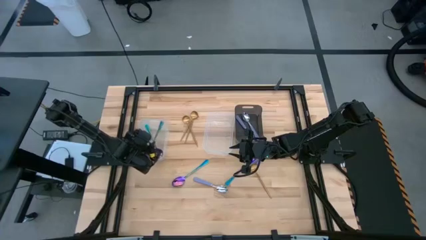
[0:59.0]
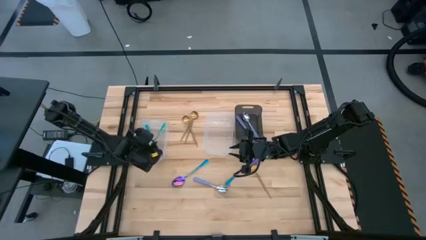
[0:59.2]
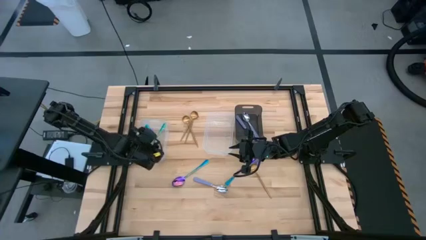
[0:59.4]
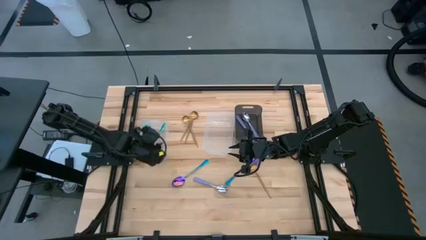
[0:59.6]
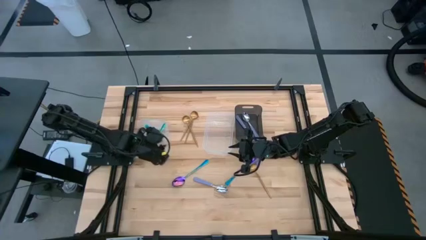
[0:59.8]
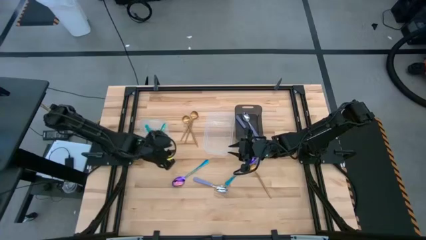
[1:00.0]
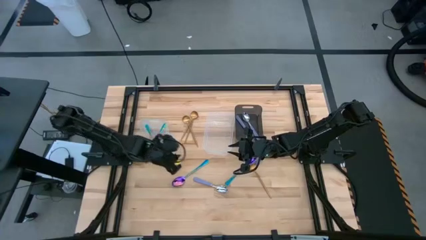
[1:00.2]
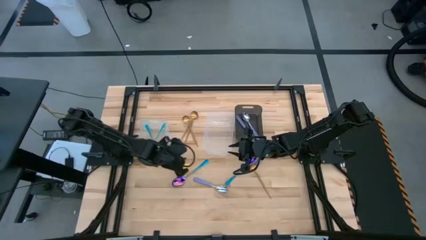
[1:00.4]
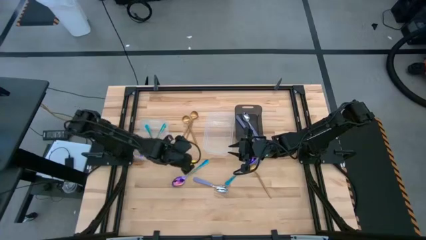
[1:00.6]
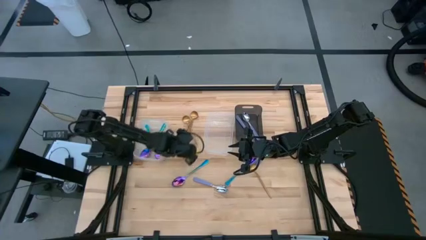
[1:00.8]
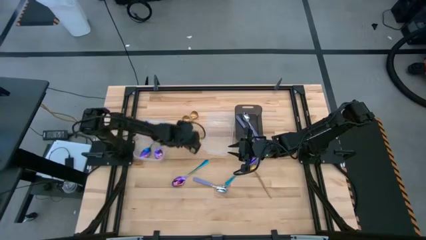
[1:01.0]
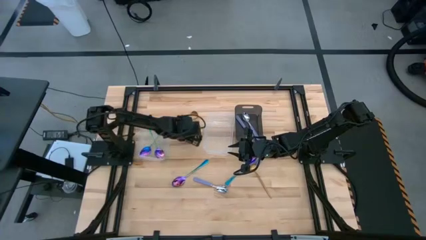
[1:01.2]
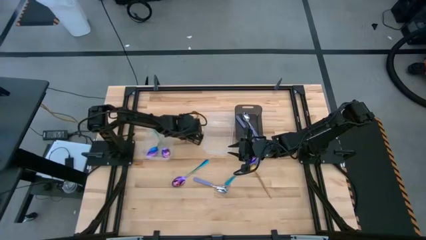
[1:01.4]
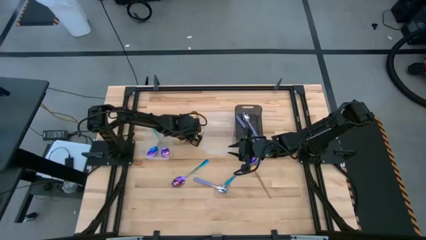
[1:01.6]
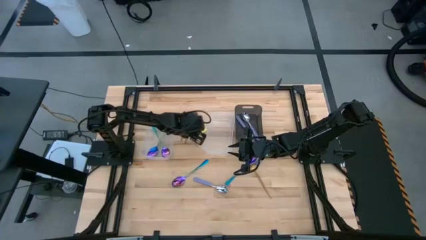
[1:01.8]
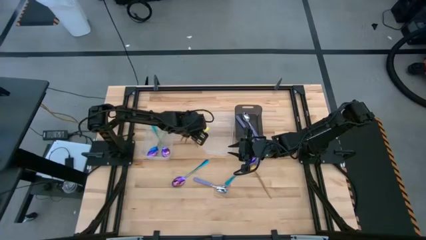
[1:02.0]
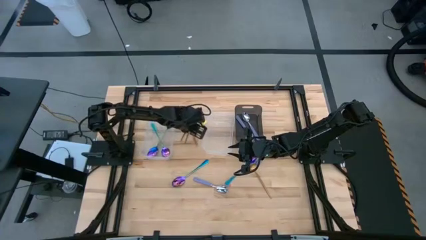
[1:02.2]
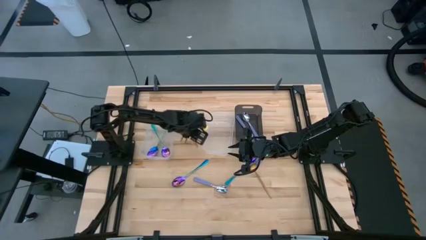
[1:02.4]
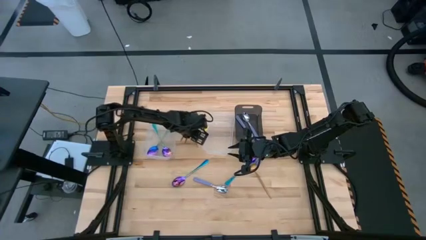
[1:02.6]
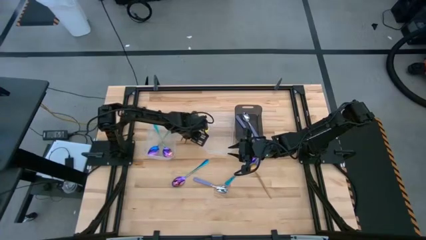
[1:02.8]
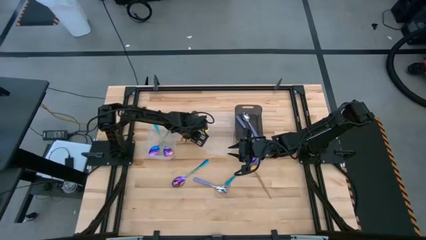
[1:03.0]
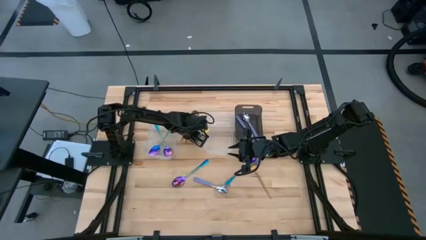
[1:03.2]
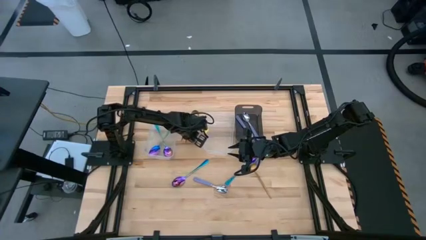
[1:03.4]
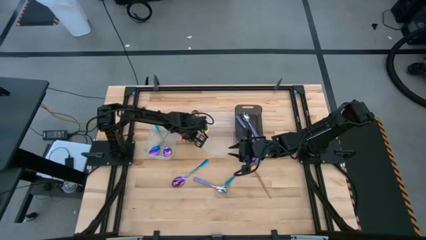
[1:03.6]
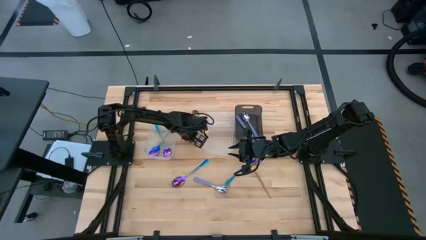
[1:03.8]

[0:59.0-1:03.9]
Task: Sort silverware by color (type)
Put the gold spoon into the right transparent bin

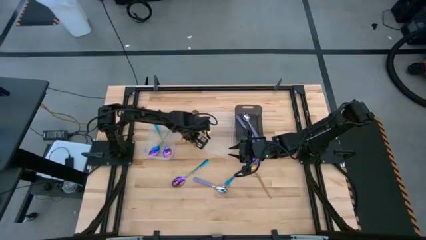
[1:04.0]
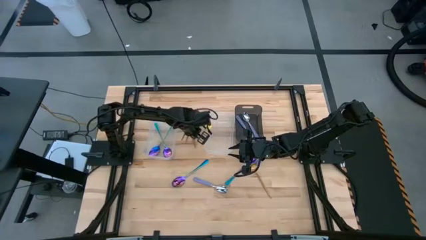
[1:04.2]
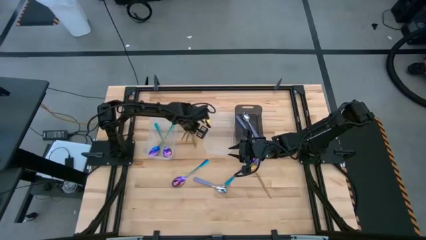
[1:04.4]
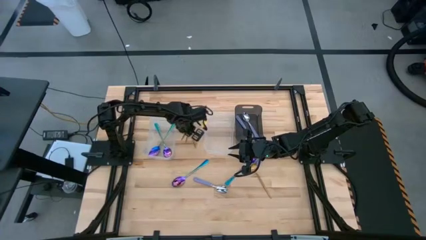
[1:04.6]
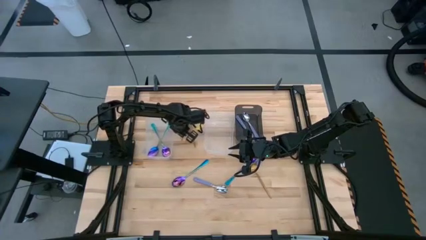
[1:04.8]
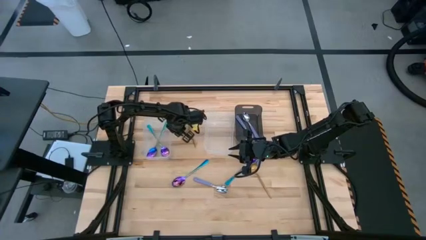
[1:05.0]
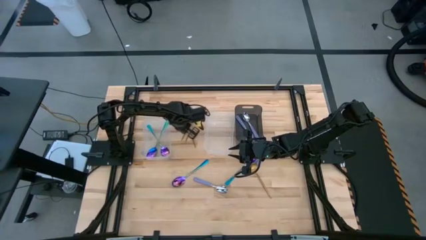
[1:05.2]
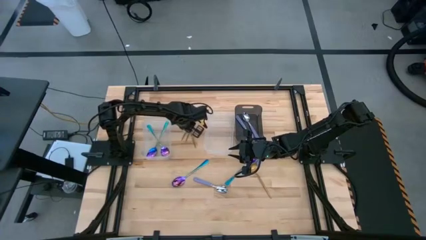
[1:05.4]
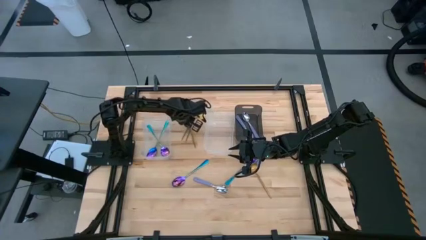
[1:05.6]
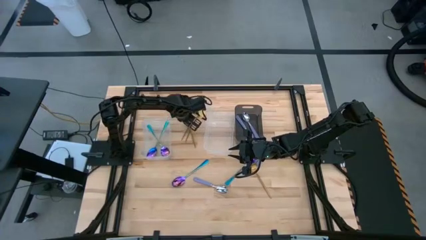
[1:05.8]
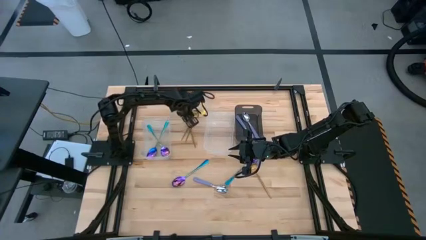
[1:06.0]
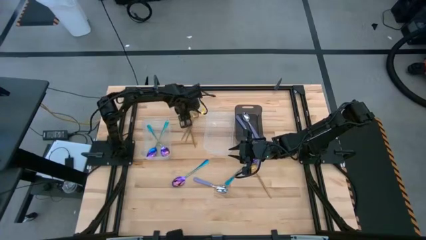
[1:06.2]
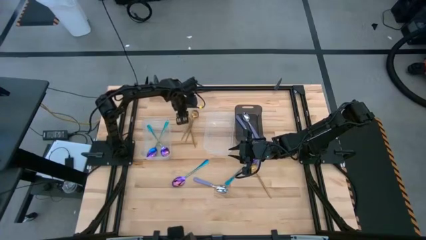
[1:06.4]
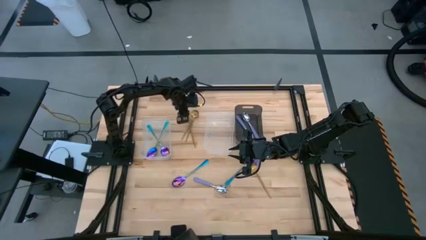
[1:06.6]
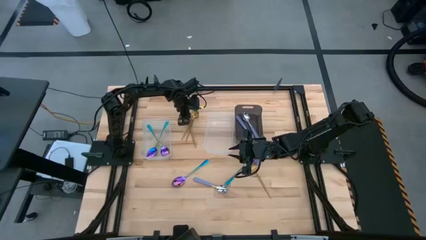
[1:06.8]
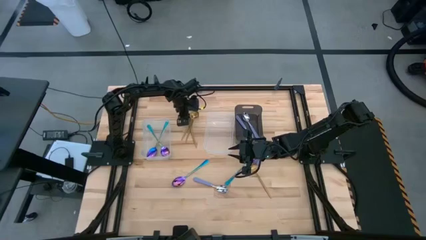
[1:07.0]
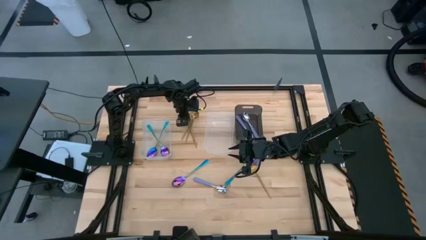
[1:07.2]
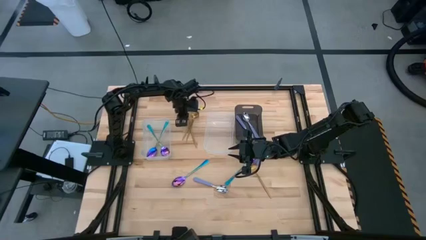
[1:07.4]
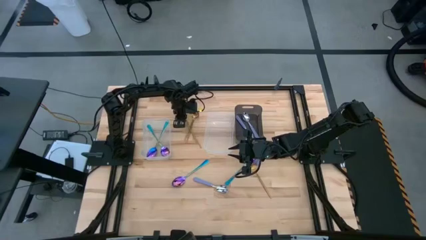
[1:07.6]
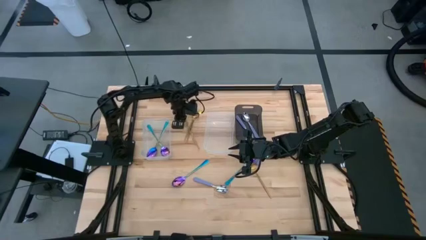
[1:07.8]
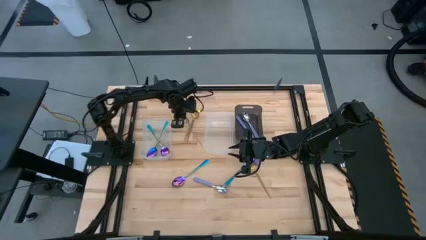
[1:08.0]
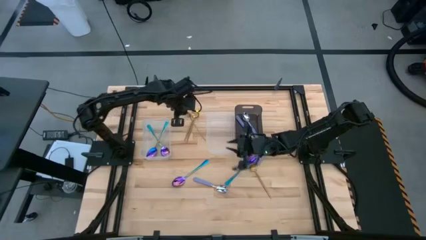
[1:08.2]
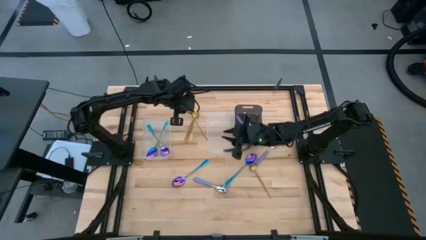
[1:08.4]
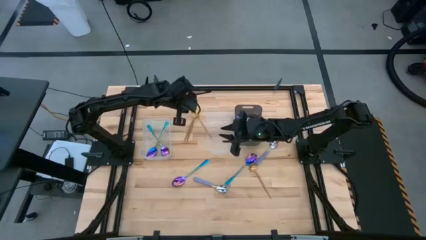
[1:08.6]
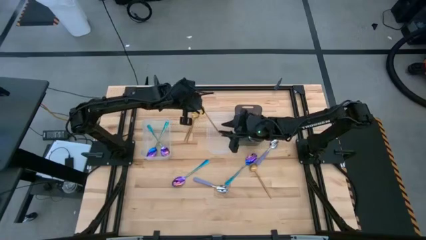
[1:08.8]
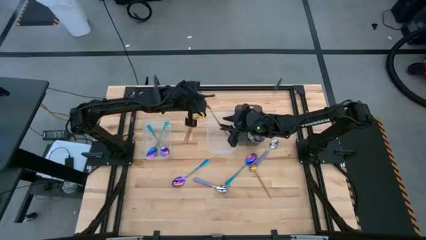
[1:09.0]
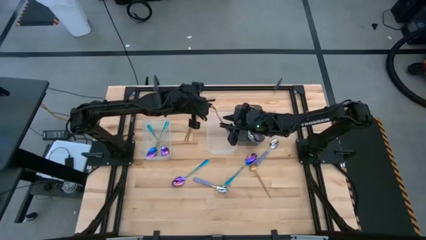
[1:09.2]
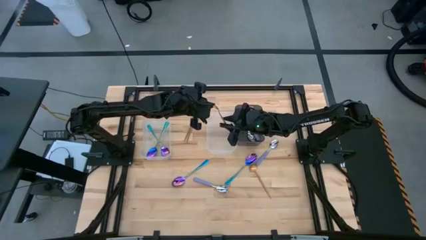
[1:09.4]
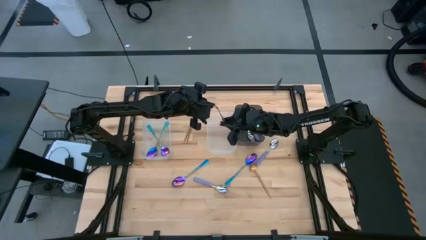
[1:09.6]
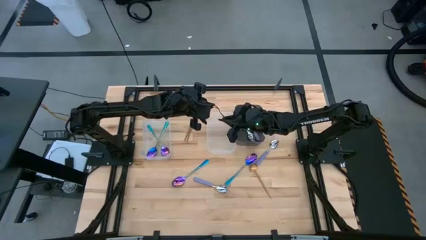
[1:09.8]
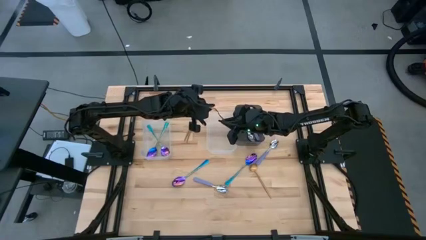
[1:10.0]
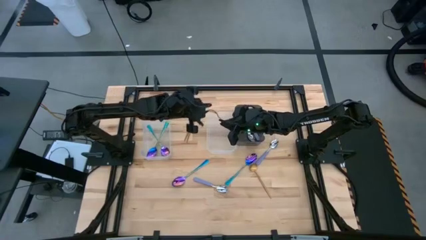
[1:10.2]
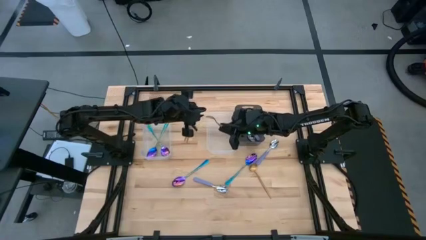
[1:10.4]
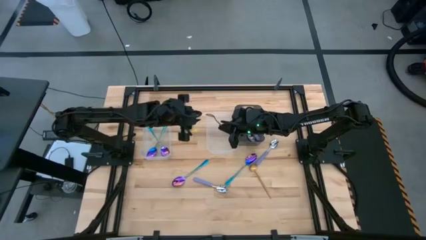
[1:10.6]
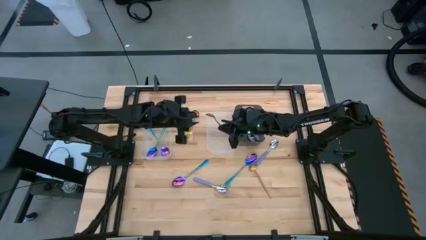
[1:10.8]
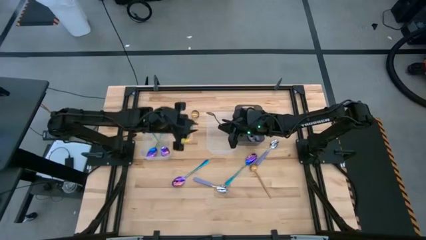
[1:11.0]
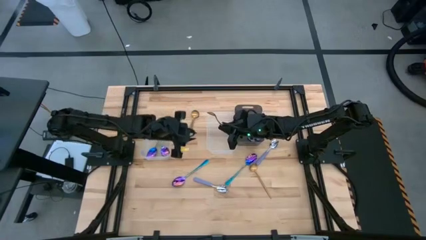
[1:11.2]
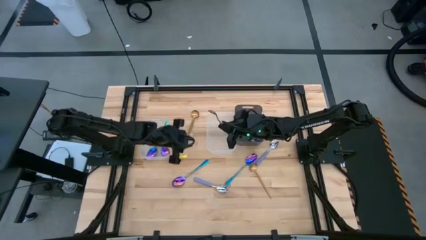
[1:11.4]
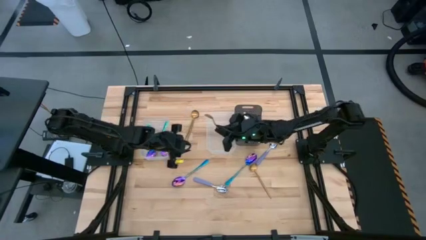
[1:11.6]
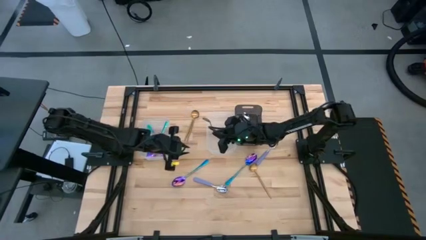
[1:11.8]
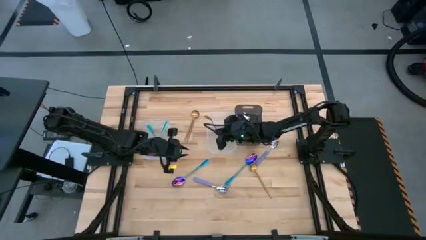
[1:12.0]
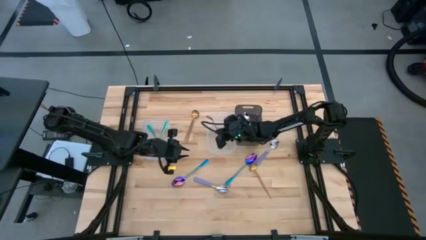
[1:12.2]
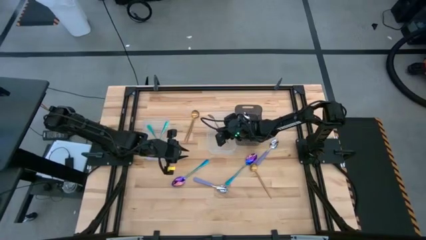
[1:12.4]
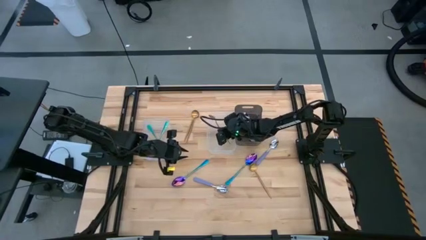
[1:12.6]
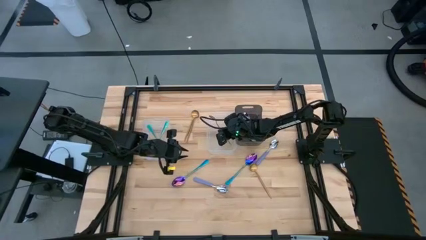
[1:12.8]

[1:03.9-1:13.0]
Put the gold spoon into the right transparent bin

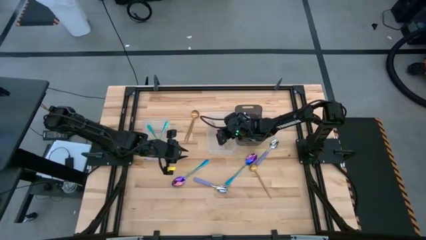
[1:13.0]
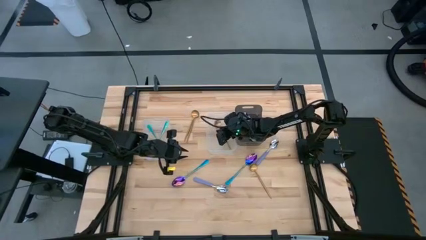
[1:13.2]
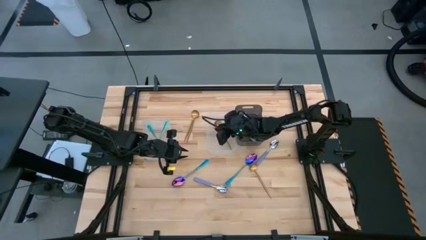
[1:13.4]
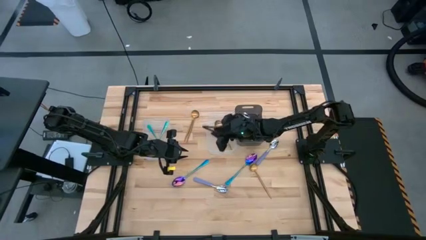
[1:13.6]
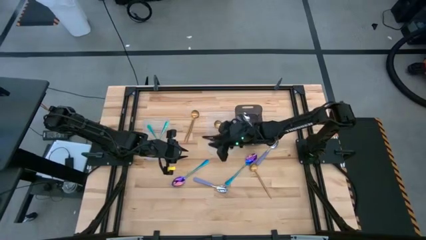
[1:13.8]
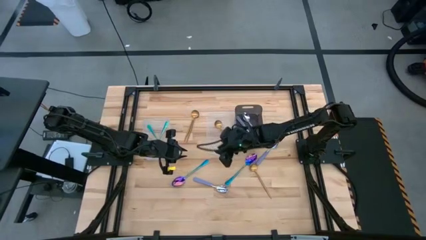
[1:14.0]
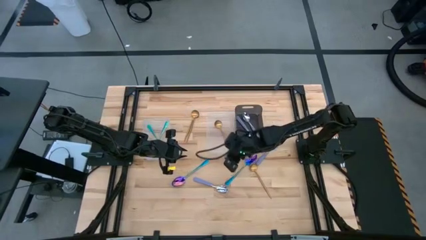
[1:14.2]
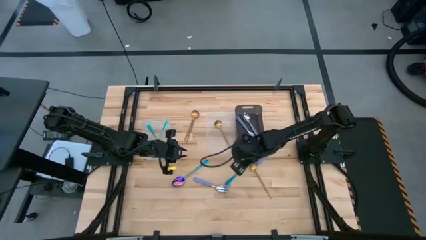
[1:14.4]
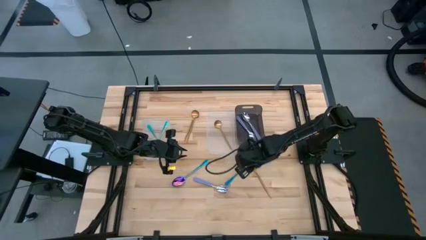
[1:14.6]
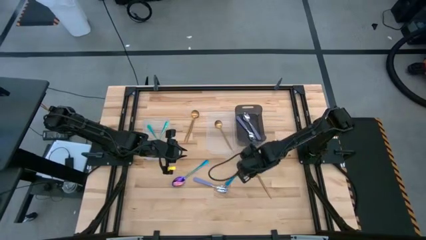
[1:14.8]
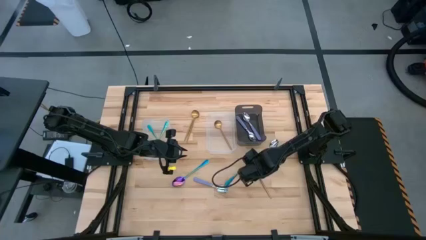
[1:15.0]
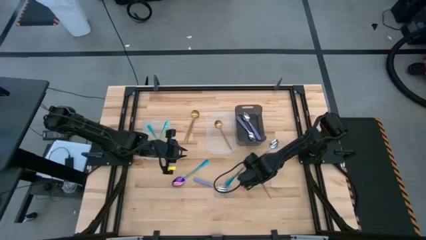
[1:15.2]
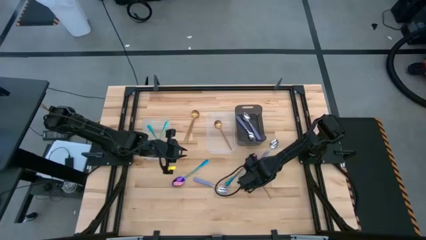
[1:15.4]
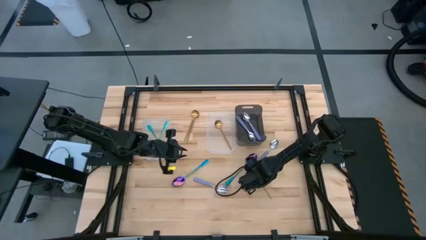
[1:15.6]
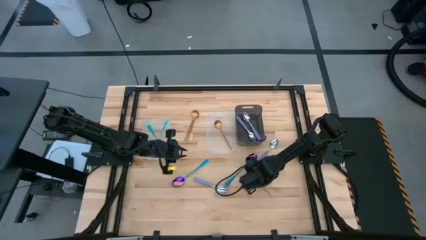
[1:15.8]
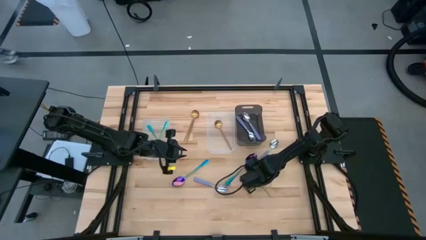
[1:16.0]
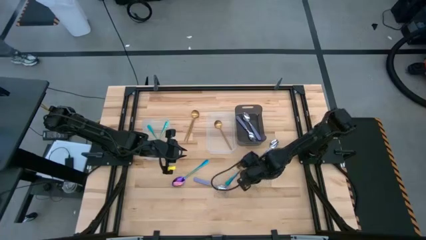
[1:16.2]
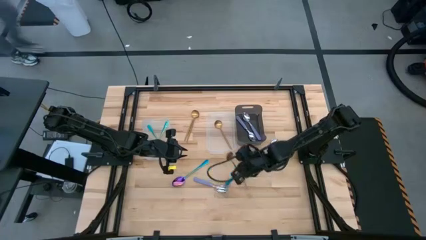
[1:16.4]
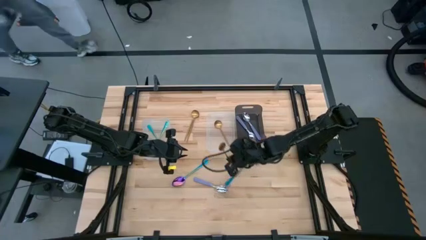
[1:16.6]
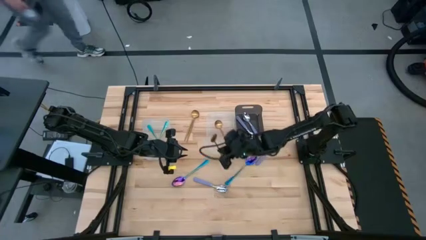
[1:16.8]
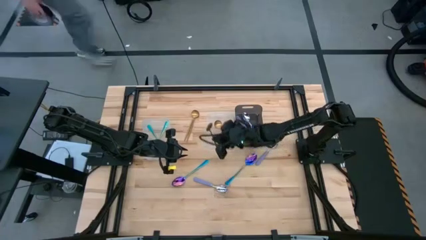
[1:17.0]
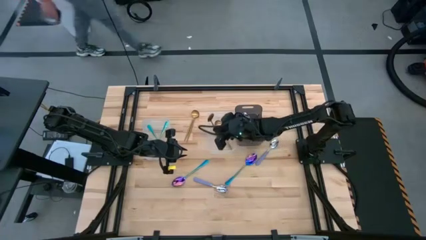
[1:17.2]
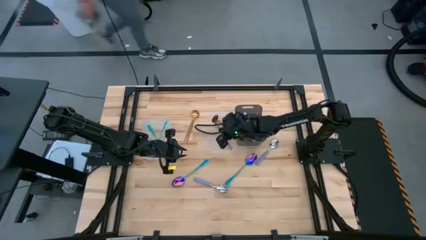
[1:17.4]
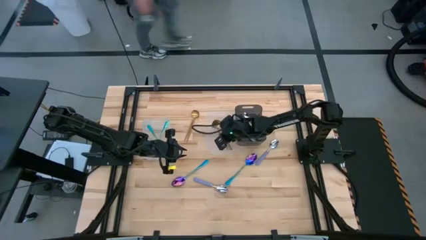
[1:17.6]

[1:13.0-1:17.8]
Put the gold spoon into the right transparent bin
